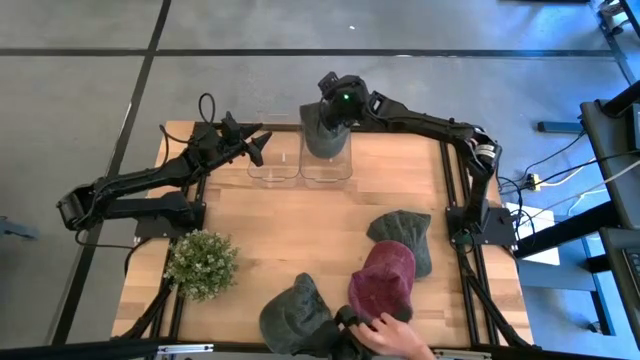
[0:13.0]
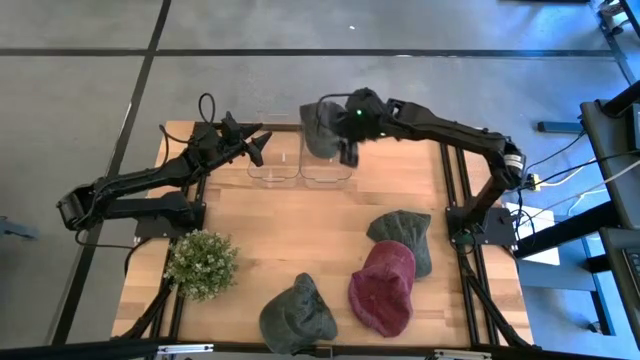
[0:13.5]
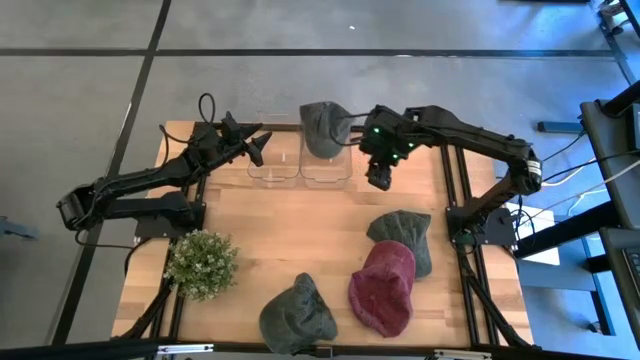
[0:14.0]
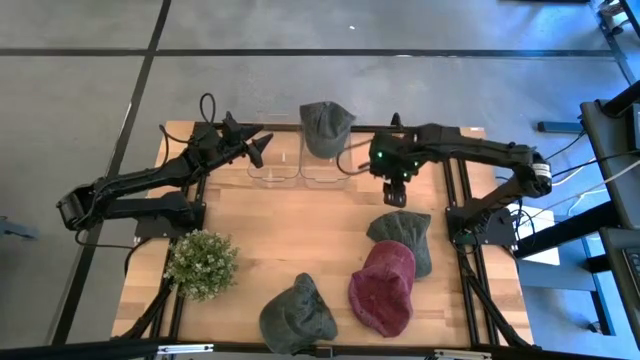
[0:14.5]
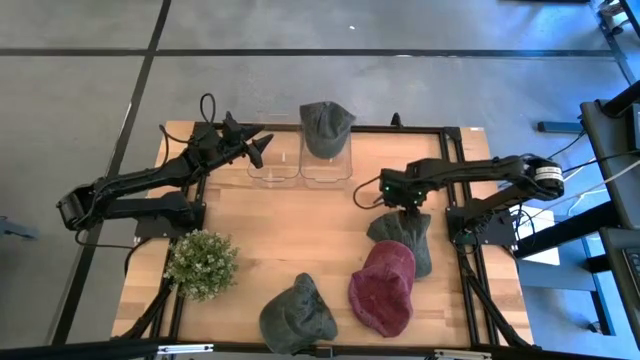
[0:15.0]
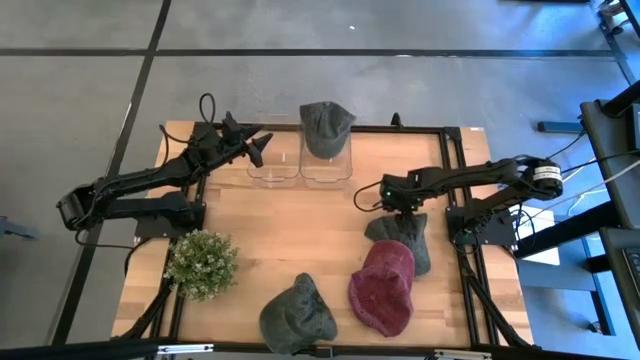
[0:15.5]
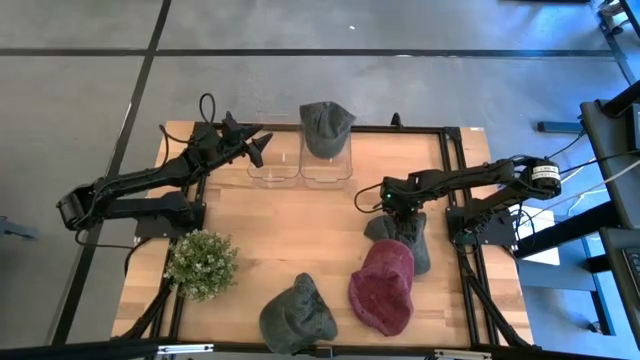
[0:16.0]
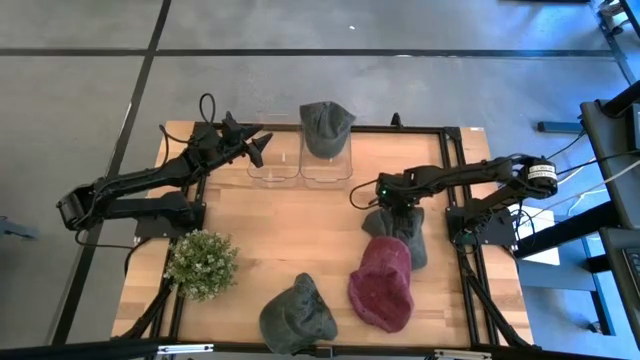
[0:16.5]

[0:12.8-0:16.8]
Task: Pick & Place hat
Put the top black cap into the right transparent bin

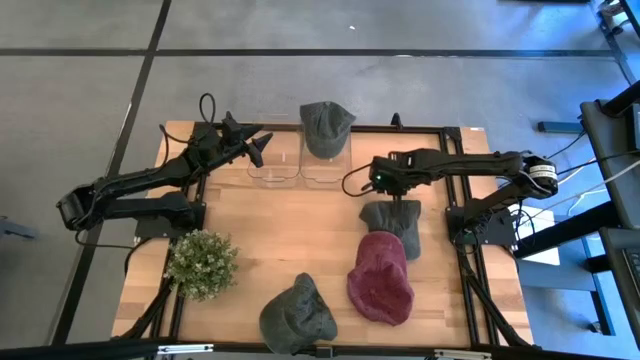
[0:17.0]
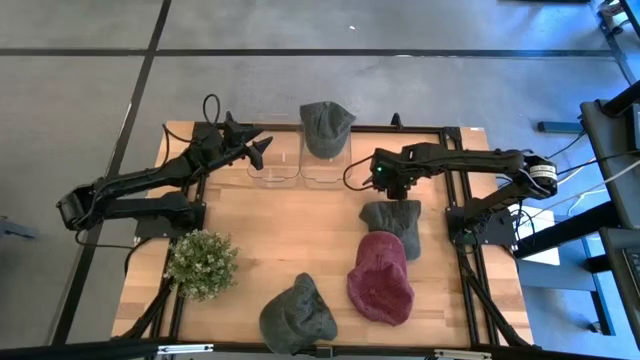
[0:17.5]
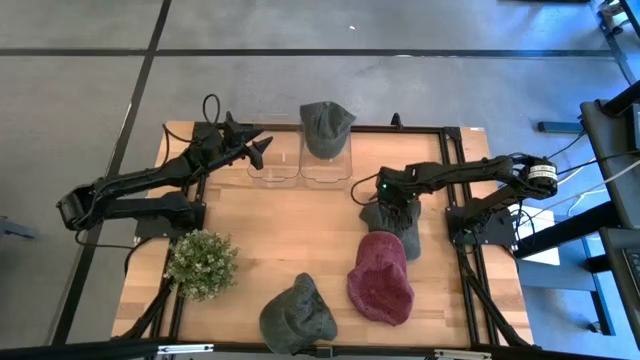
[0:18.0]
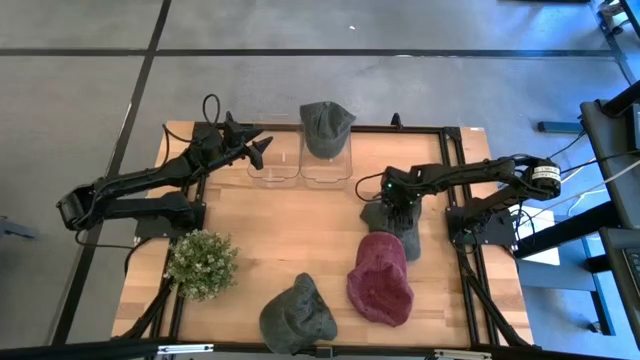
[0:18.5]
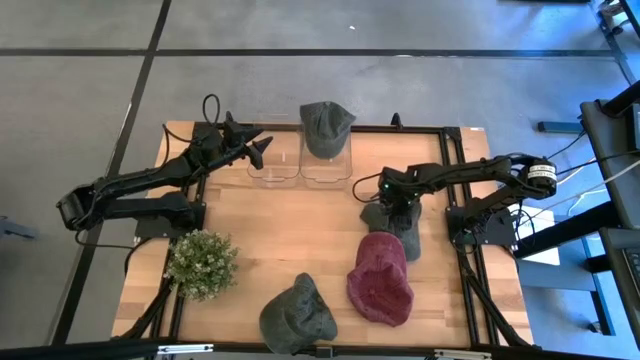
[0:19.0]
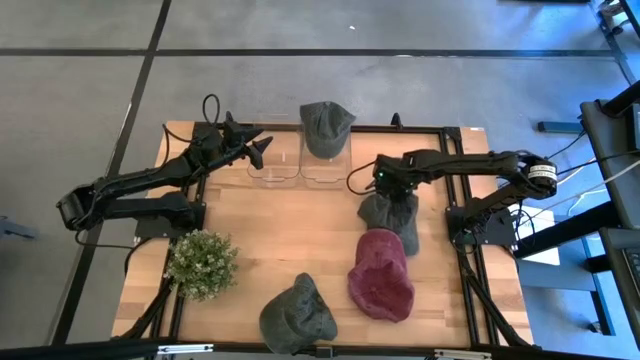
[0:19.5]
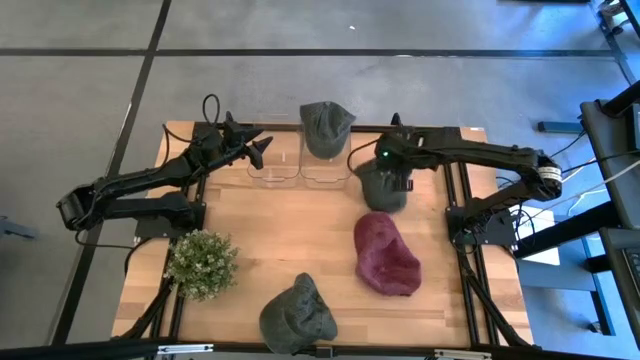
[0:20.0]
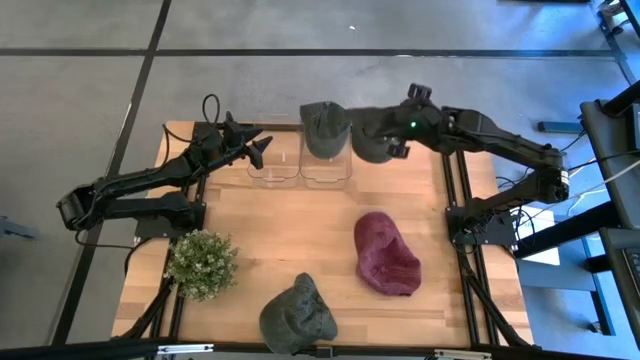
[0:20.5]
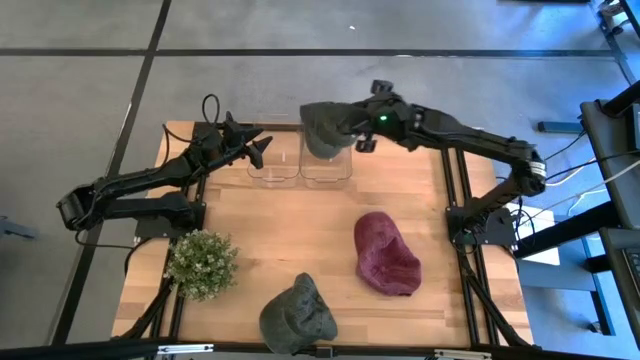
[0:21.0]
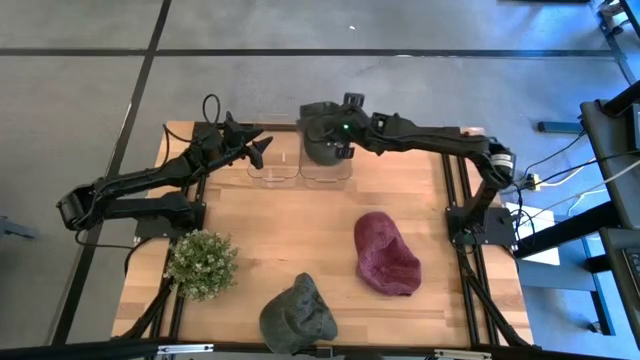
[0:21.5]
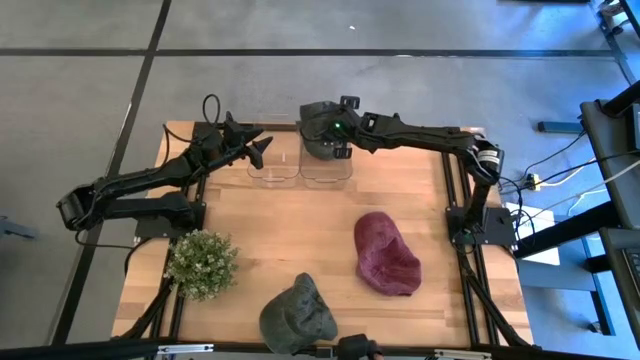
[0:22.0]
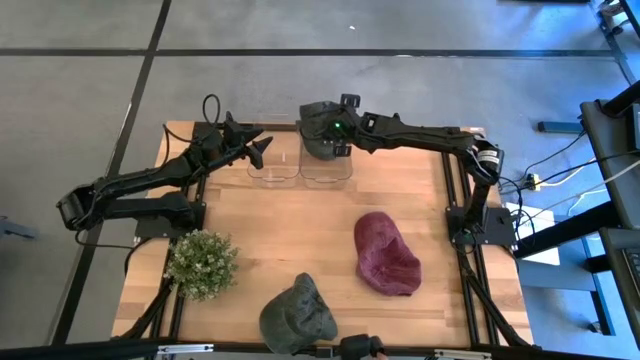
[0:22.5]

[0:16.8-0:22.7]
Put the top black cap into the right transparent bin

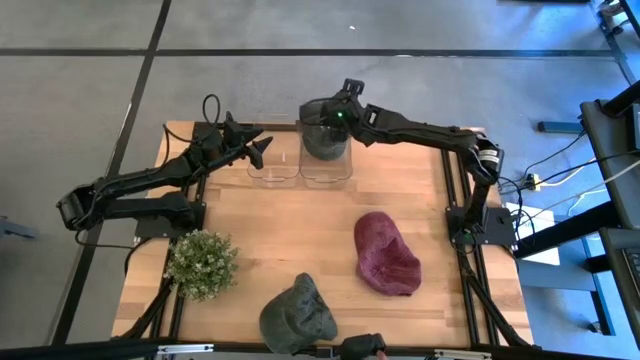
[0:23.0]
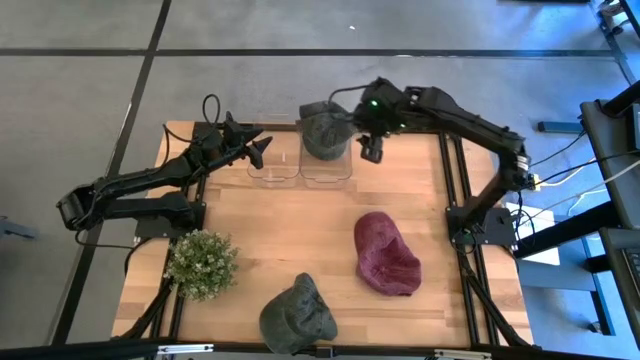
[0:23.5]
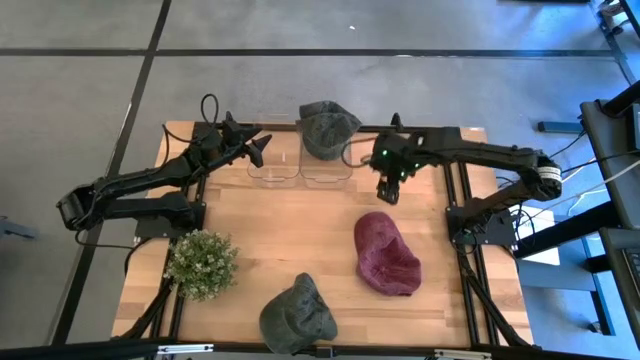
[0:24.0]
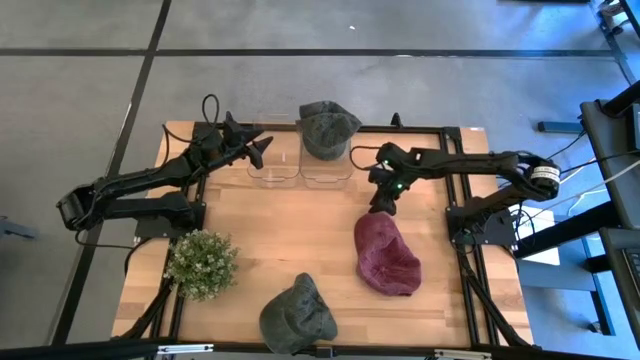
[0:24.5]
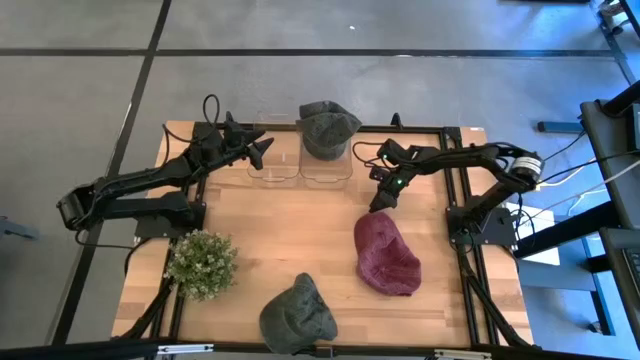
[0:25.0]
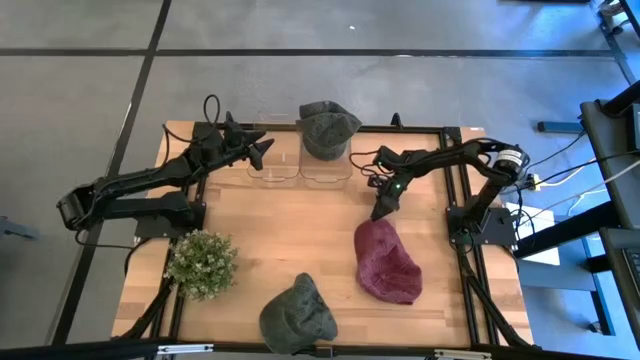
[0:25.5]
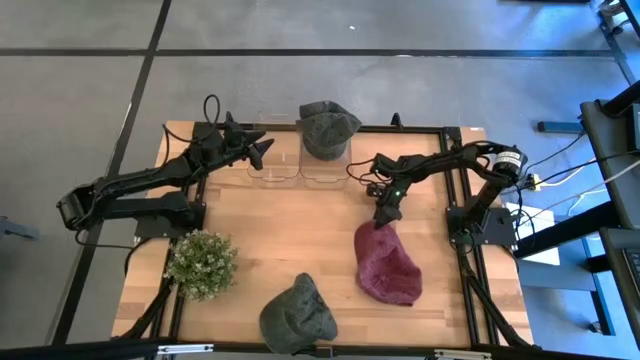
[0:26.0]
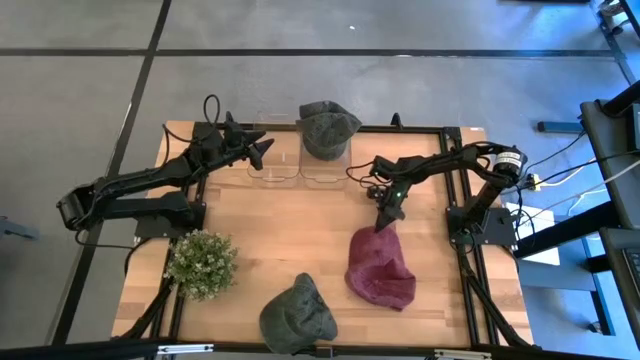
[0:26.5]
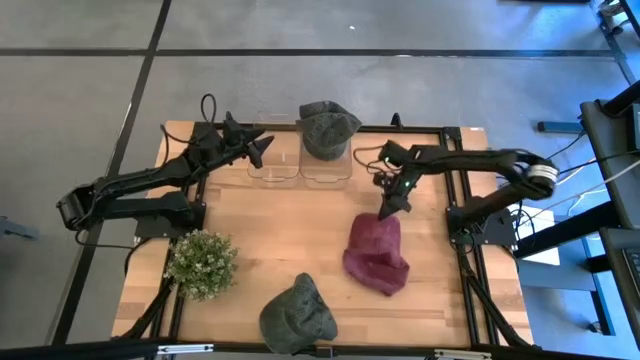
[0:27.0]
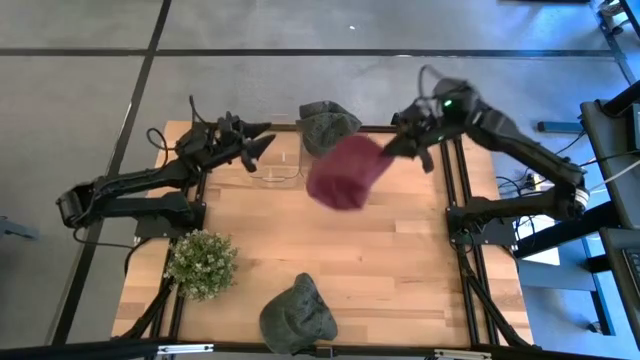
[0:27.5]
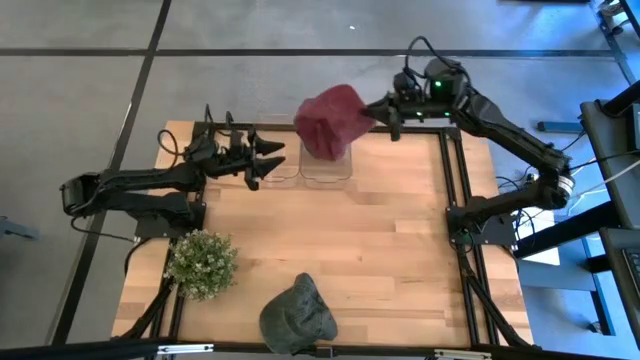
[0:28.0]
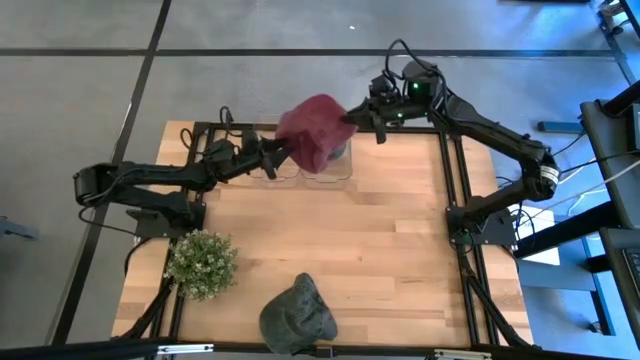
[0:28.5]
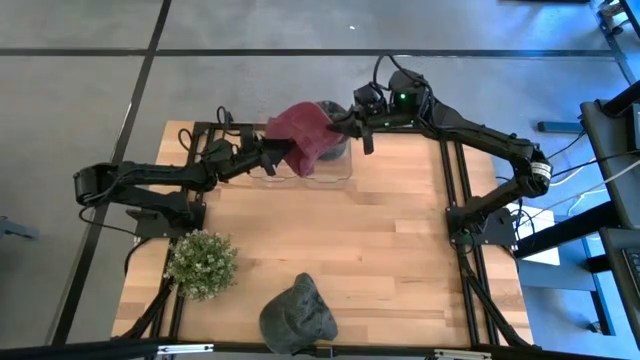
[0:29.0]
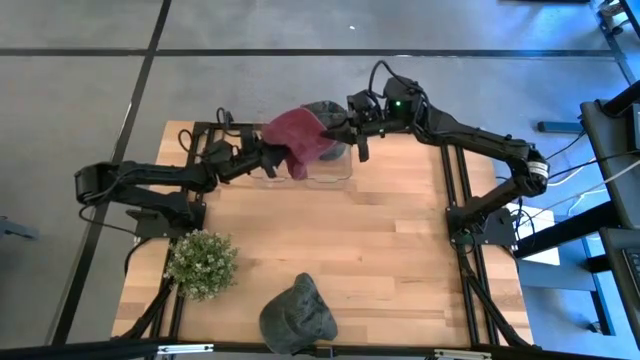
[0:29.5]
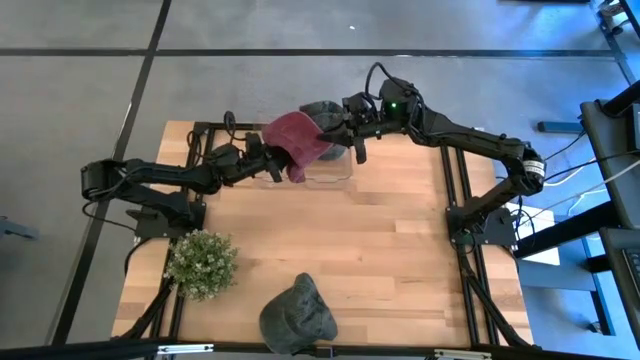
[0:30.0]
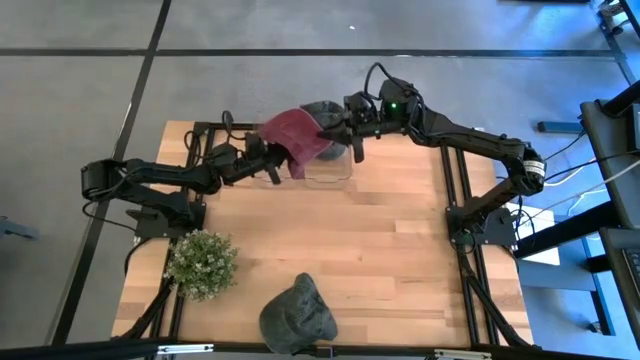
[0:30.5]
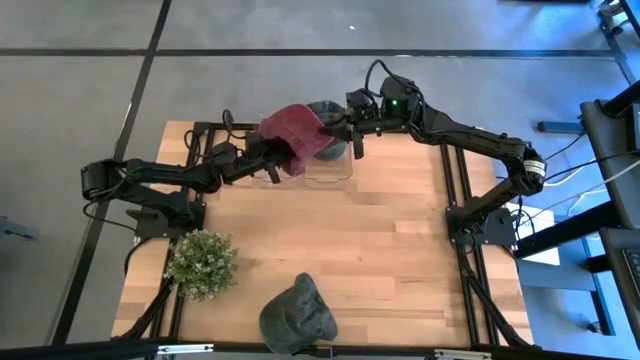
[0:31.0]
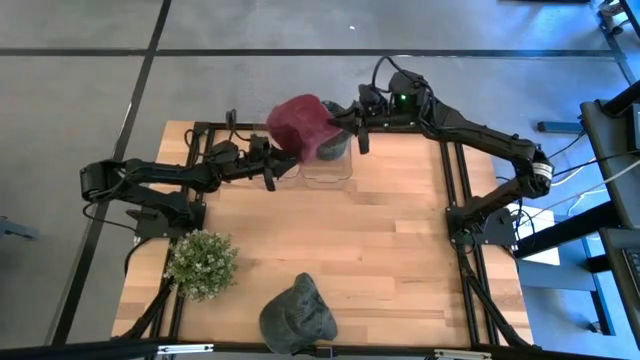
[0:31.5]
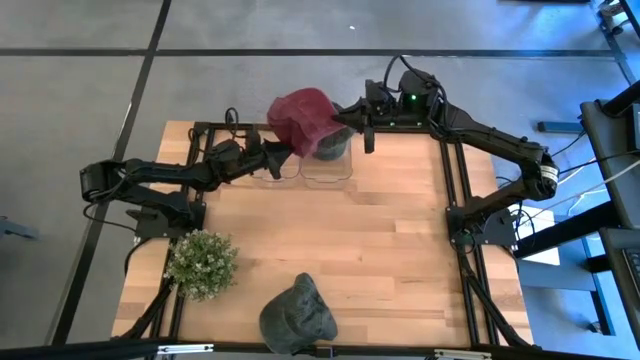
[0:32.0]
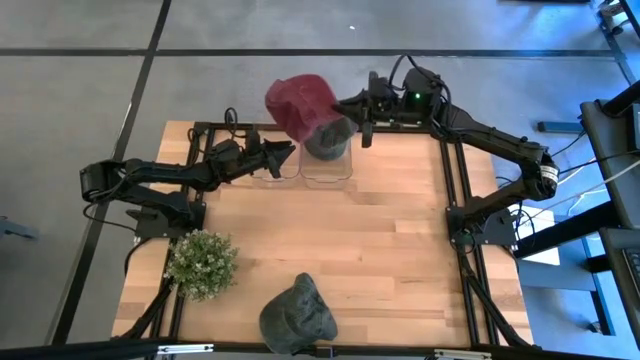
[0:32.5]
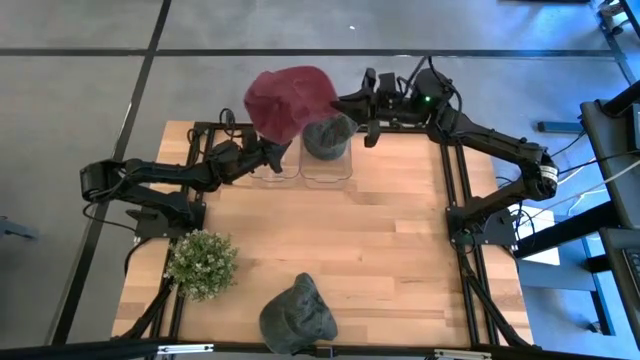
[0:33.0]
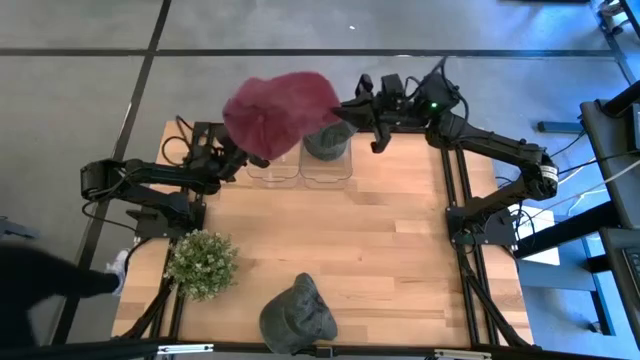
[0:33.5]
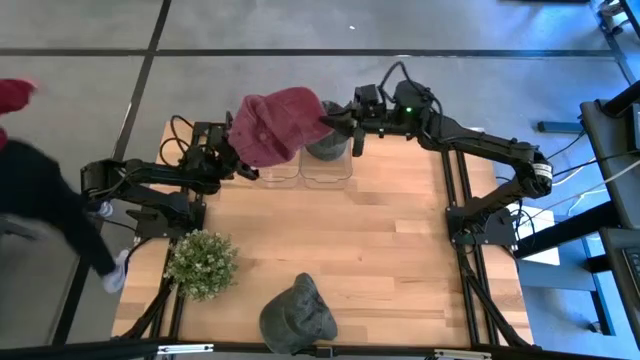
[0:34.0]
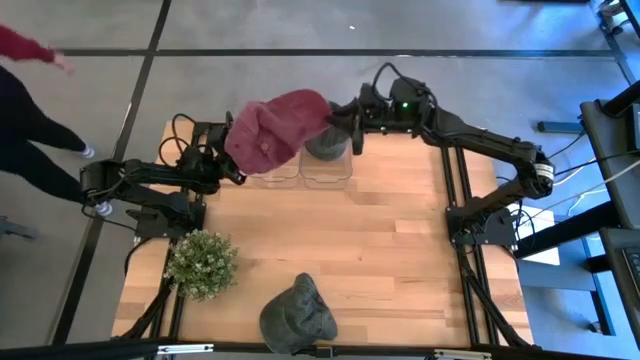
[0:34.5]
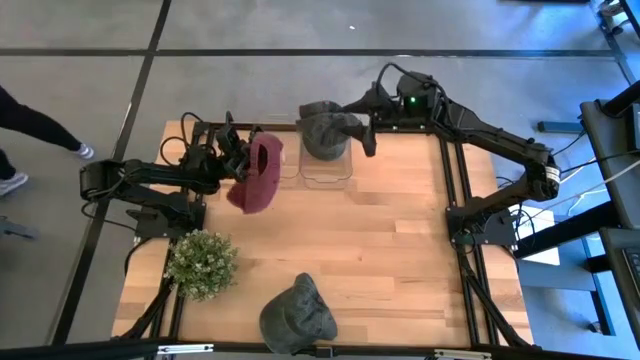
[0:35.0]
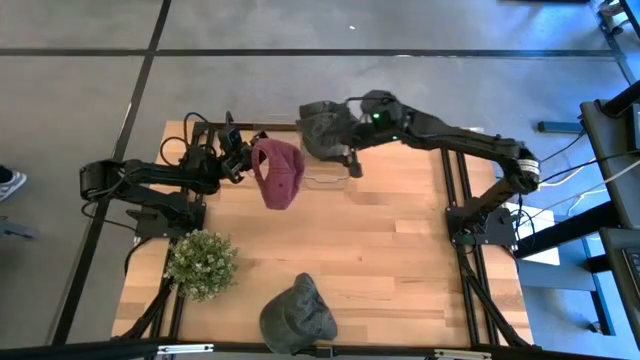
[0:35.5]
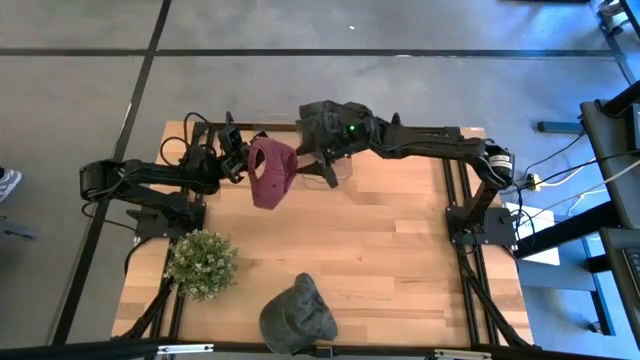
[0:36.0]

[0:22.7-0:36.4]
Put the maroon cap into the left transparent bin
